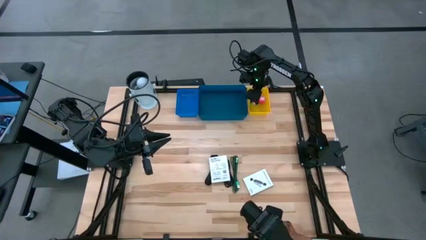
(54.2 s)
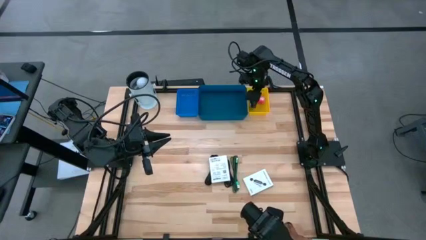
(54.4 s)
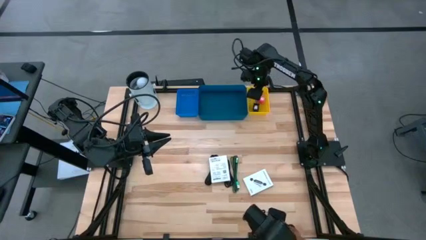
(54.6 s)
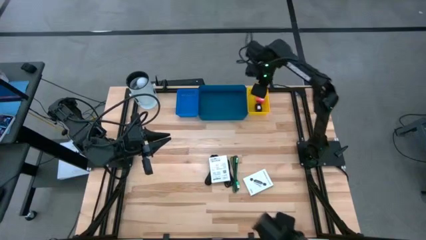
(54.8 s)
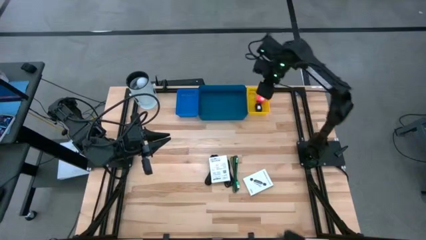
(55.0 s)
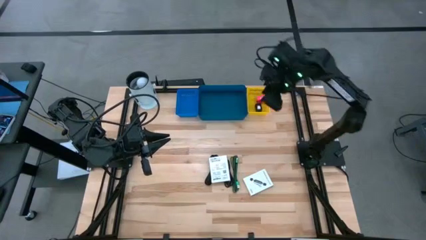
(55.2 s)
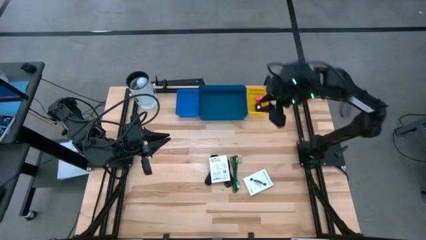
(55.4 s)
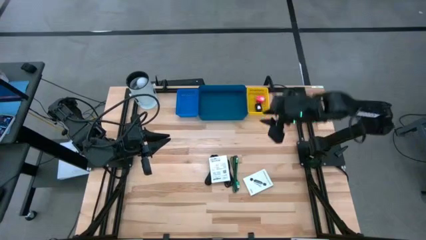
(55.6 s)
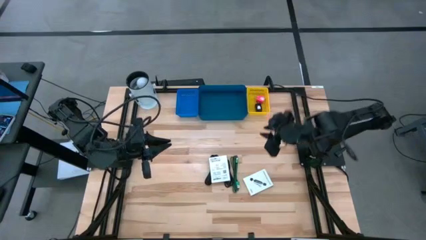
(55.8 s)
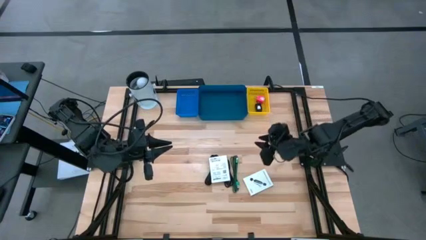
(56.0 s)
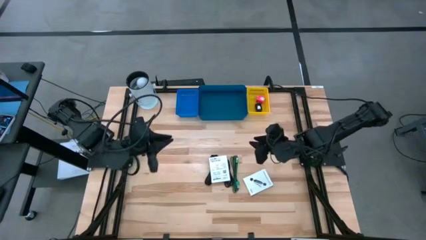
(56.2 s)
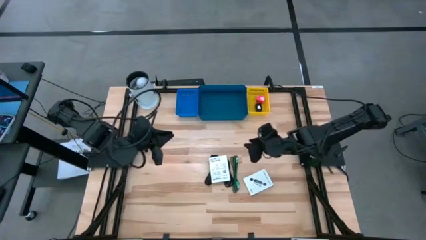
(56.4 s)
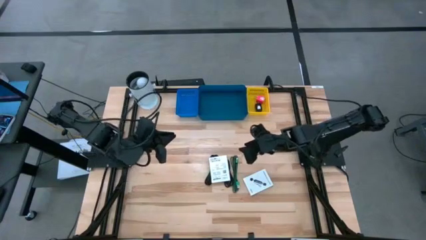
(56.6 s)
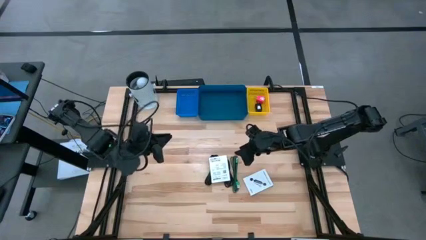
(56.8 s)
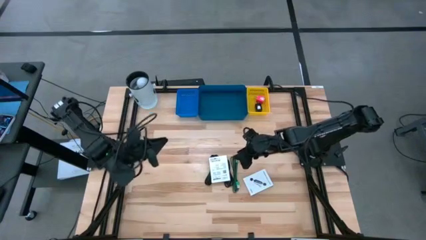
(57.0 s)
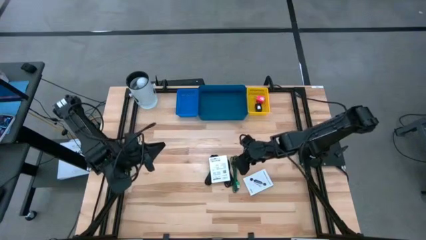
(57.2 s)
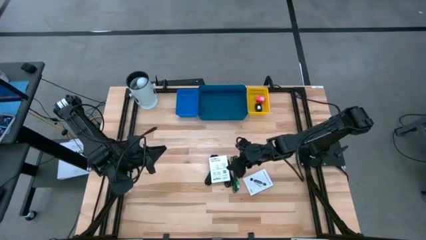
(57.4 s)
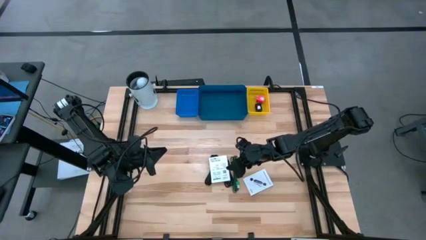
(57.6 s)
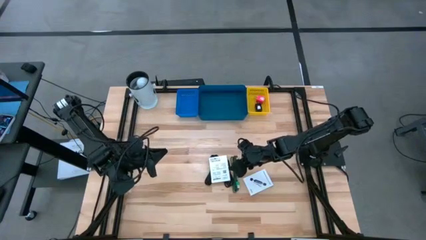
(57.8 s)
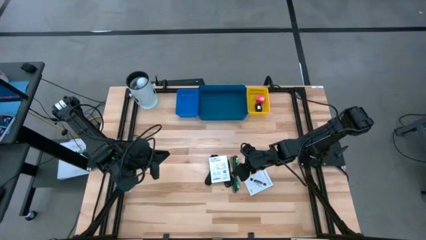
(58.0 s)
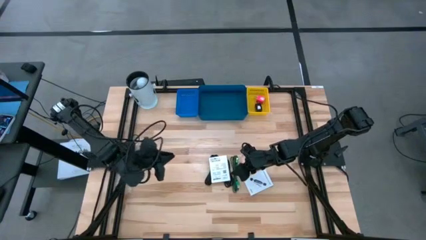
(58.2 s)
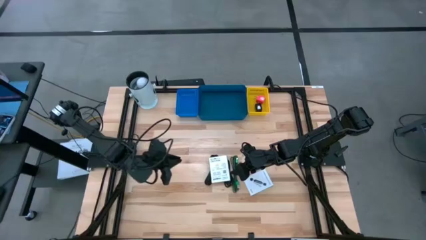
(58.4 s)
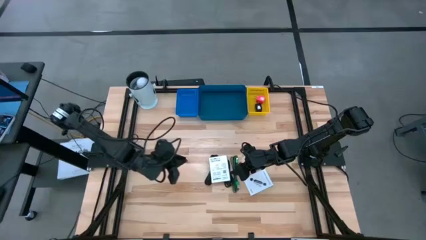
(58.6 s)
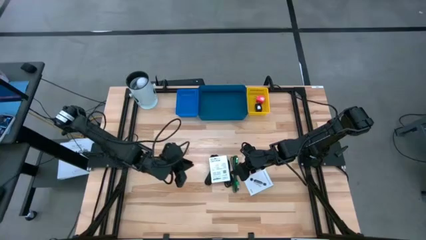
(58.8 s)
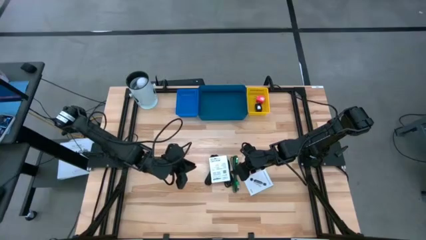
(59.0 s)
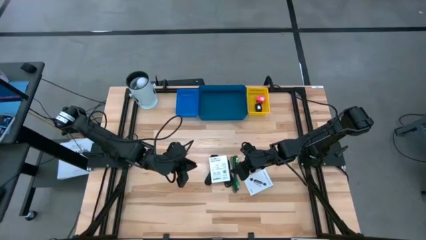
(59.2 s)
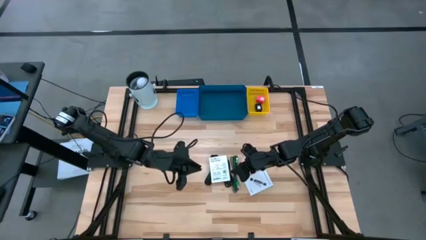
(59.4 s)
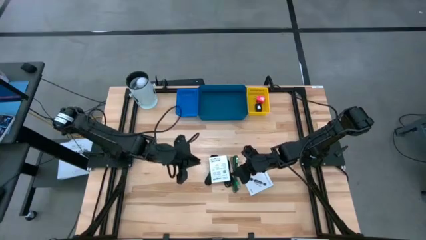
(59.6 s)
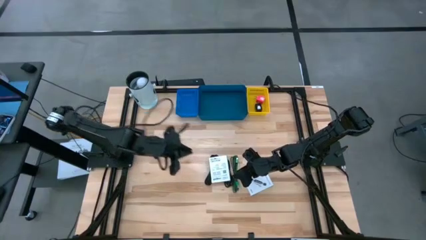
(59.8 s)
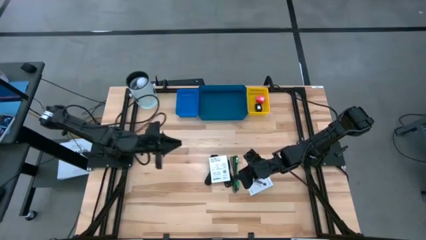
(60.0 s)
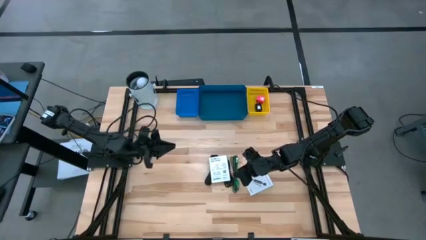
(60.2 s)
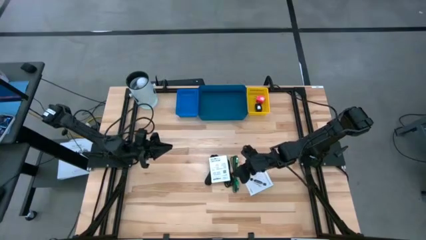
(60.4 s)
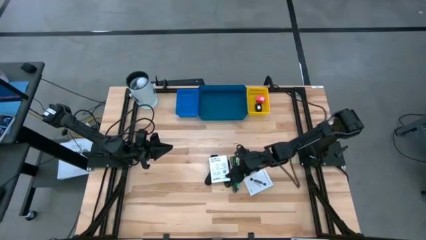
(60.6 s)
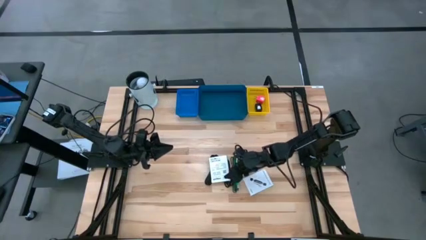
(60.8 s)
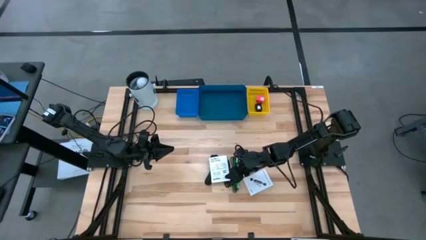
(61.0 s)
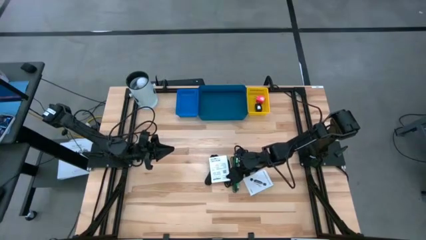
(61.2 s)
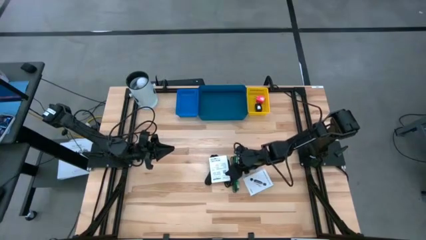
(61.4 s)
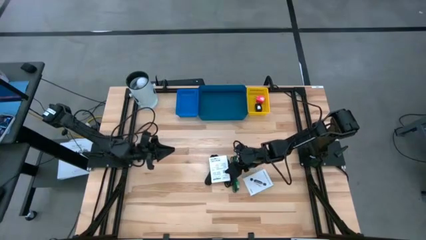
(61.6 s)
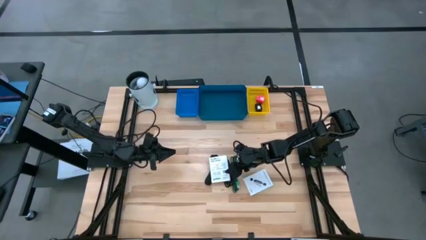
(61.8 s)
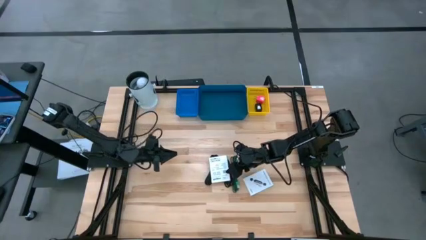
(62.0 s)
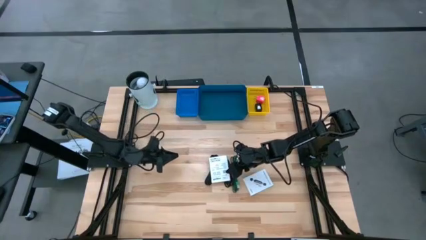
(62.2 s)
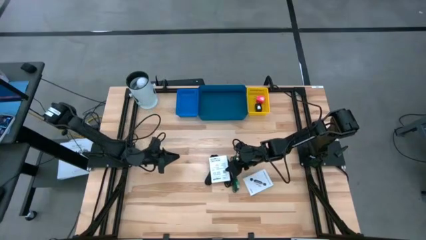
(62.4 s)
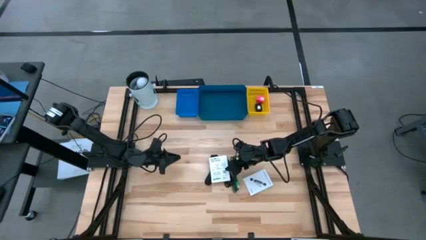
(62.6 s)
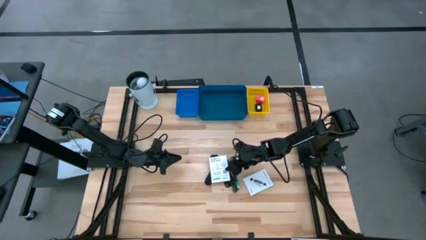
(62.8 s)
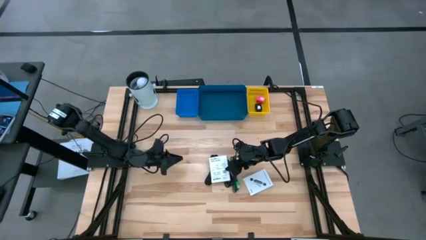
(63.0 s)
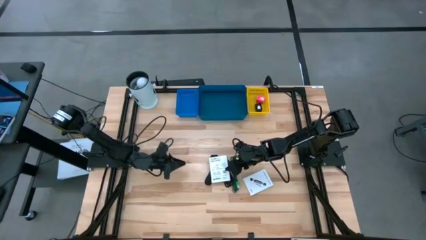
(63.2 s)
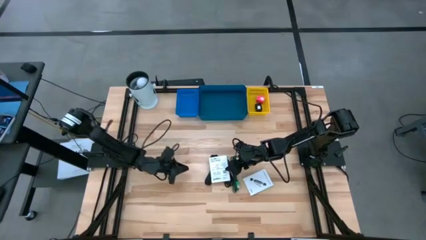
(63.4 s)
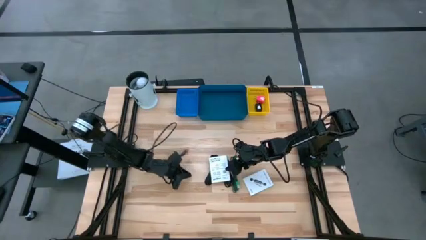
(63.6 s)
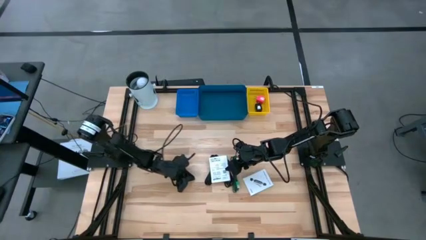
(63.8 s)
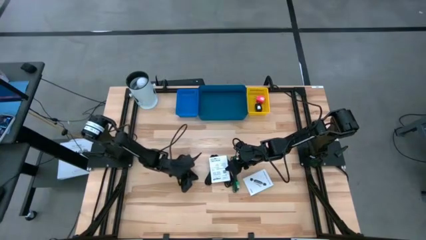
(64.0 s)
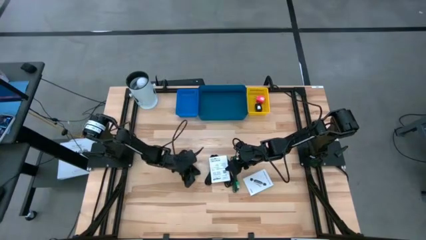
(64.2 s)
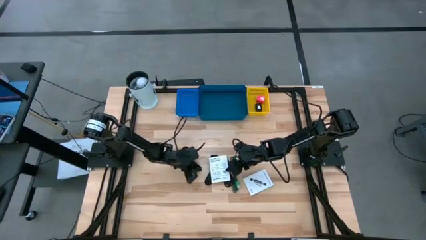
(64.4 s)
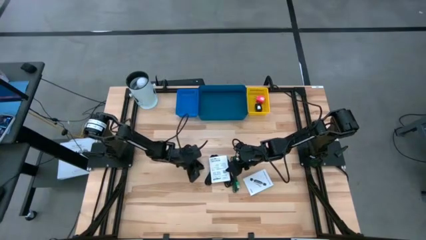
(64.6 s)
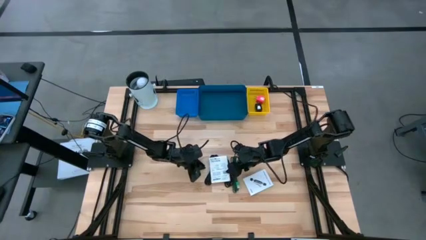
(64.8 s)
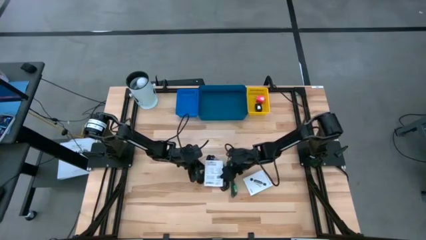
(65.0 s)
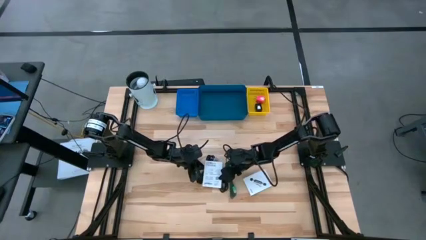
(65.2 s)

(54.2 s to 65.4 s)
Task: Pick and place items into bin
Put the left card reader box into the blue basket

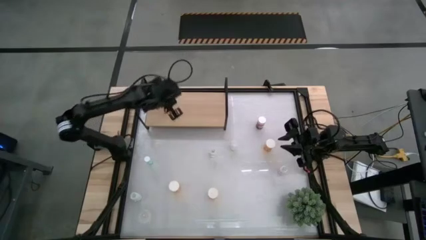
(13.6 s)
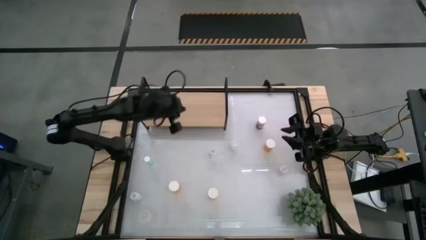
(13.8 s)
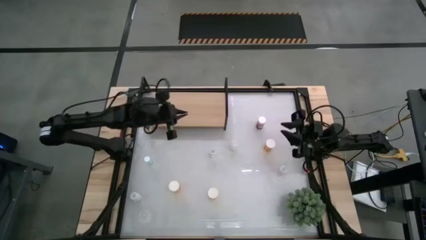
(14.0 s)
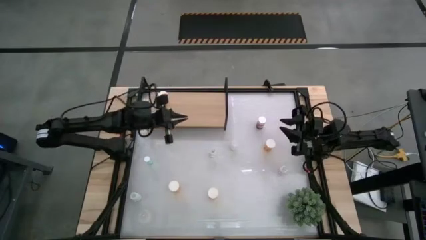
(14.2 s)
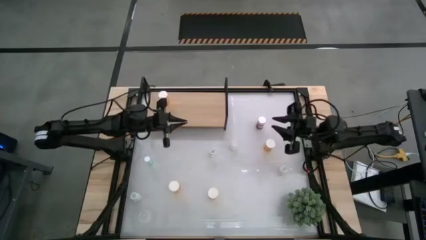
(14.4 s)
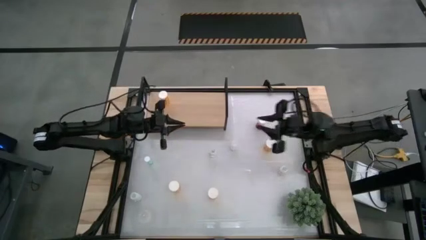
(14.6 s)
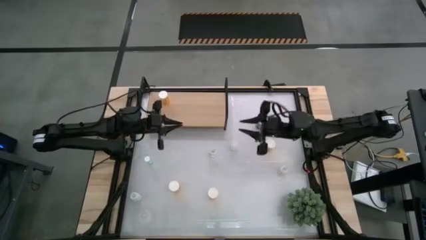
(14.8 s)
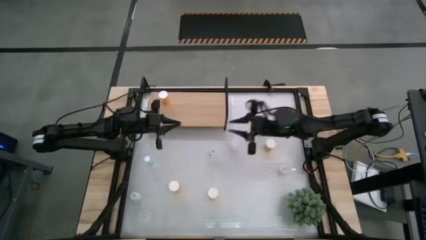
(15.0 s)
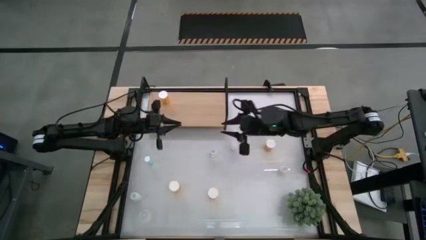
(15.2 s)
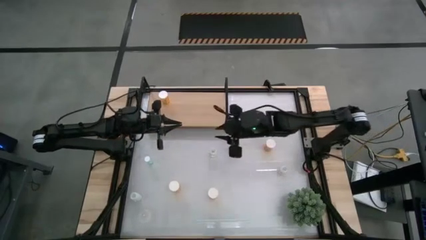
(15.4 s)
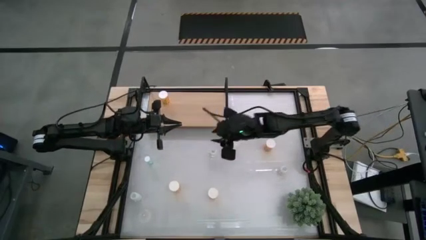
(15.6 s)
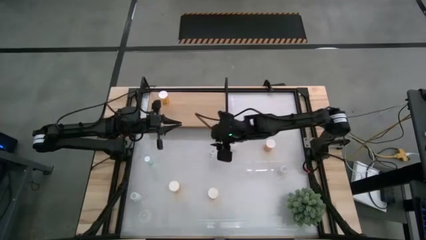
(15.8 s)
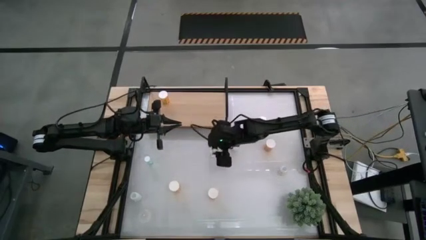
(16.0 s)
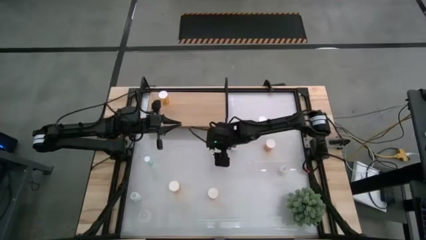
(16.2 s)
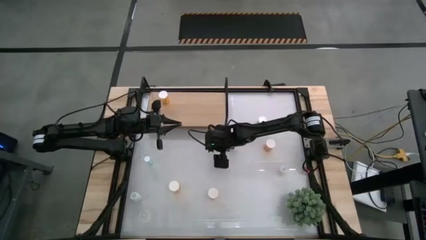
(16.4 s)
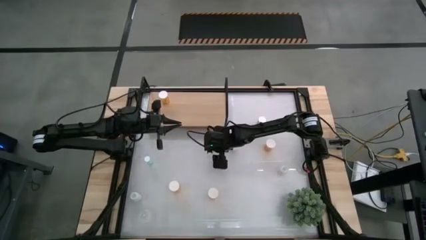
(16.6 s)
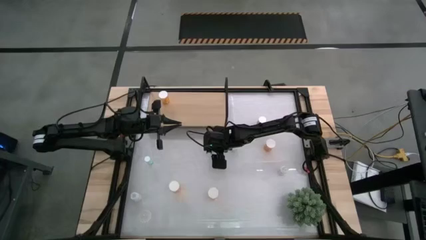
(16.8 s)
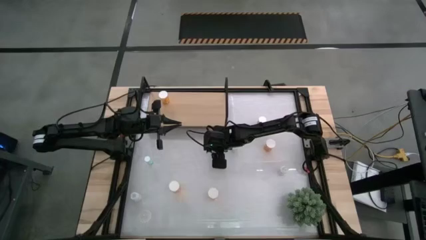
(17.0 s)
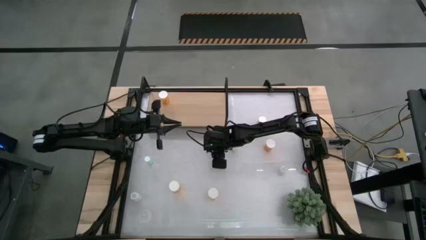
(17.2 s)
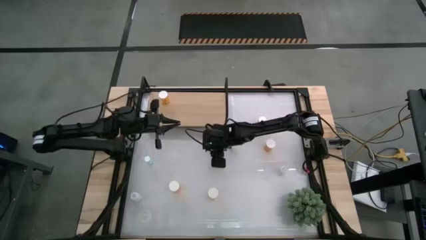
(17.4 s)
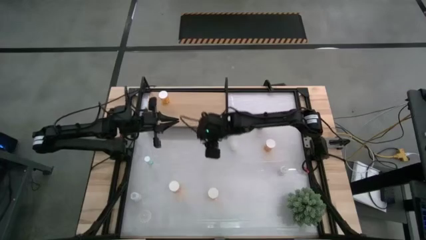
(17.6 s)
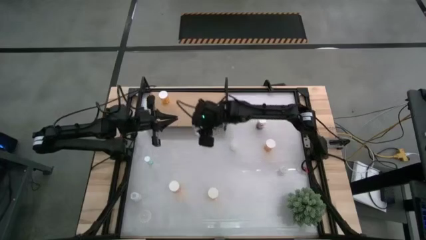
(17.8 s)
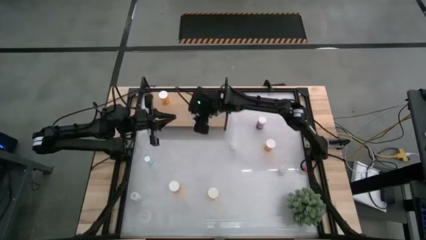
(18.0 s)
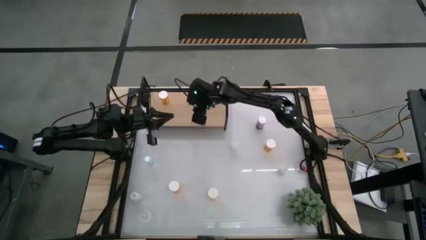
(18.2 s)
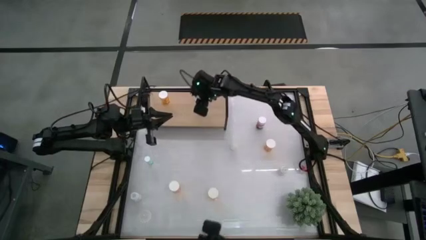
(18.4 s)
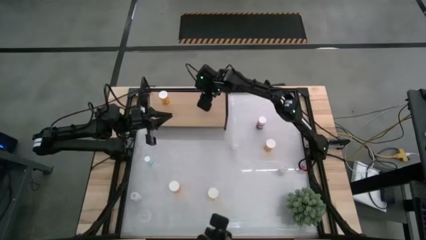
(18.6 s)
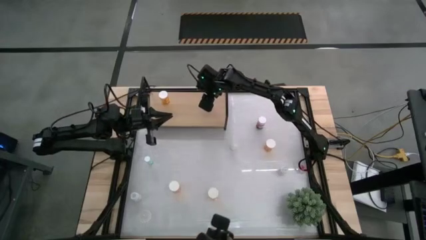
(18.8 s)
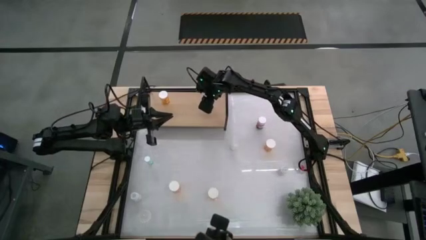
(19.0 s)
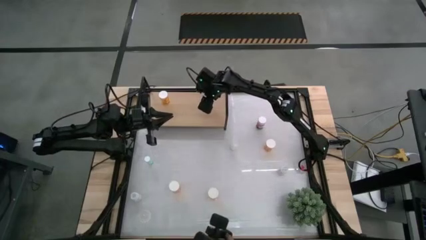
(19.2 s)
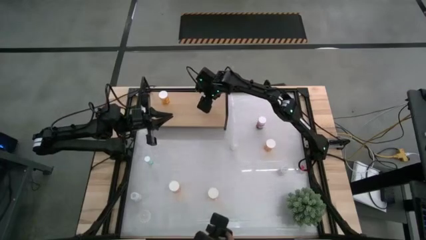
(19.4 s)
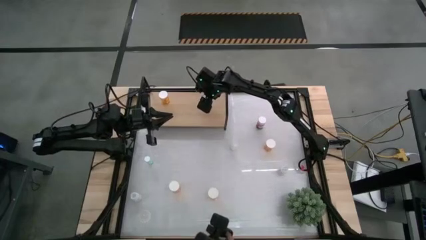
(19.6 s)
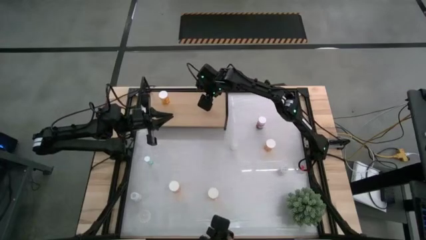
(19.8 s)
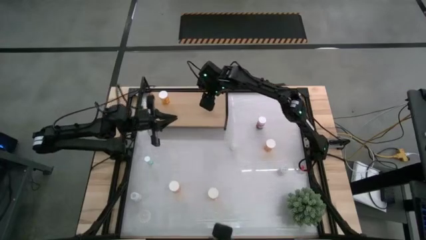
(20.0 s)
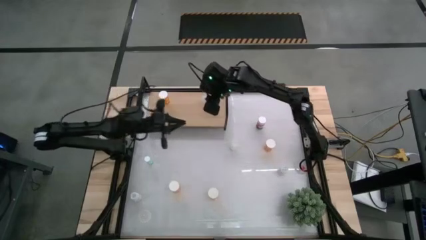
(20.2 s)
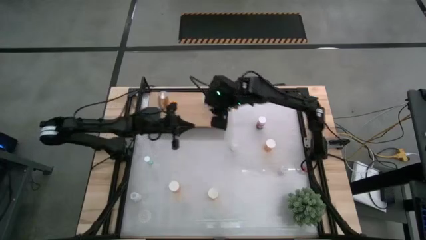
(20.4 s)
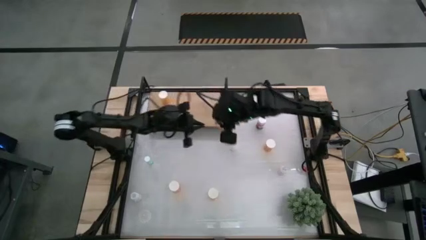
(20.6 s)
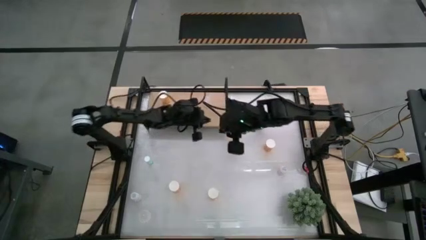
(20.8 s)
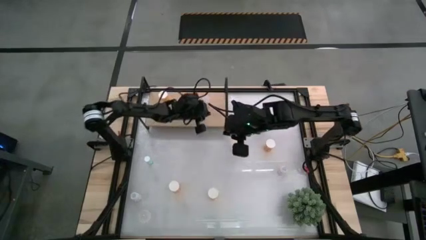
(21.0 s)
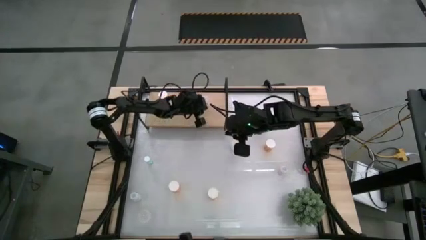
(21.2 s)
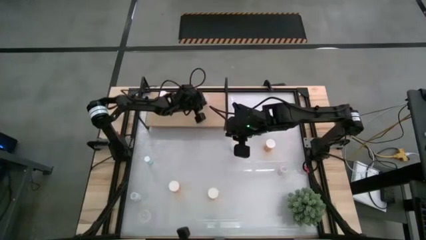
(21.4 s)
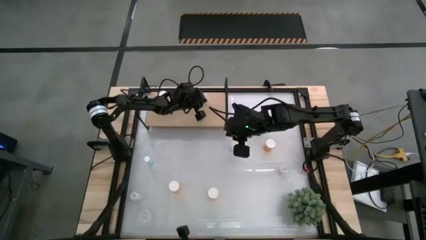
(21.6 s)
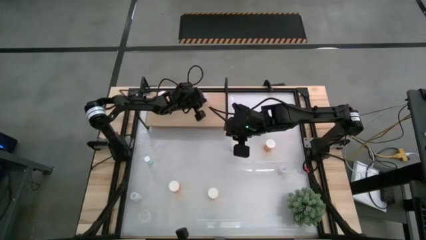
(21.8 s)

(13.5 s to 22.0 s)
Task: Pick and place medicine bottles onto shelf by color
Put the small transparent pill bottle on the shelf
